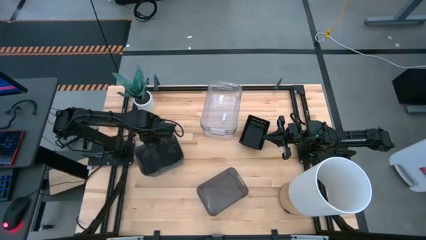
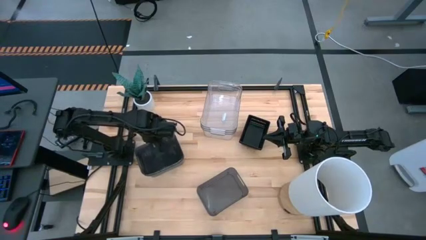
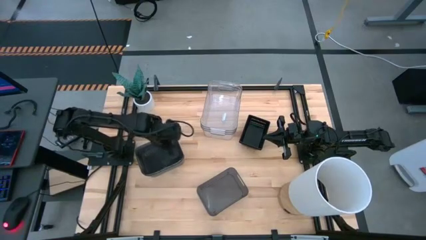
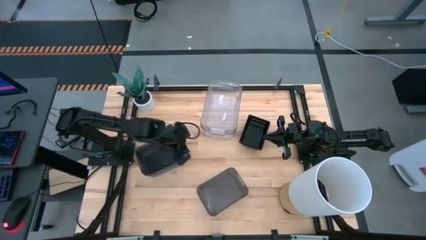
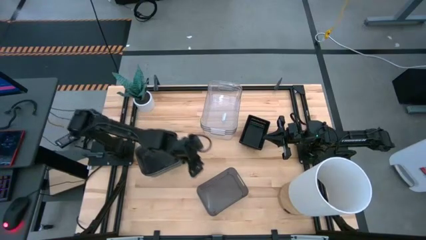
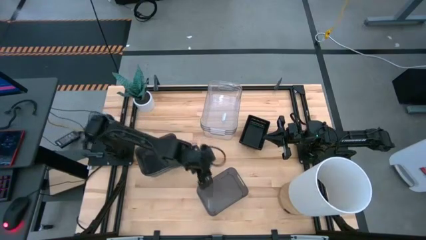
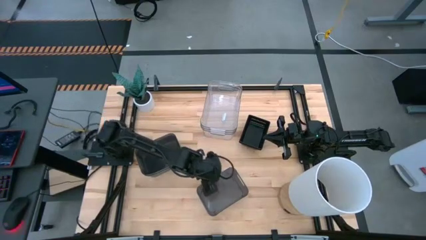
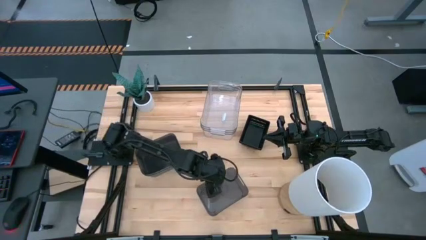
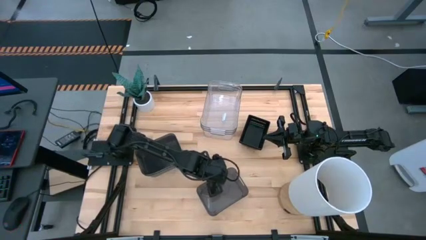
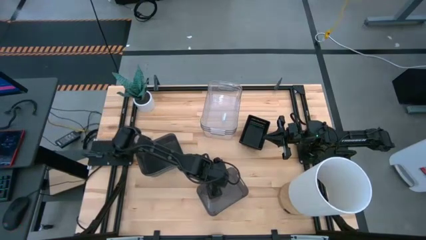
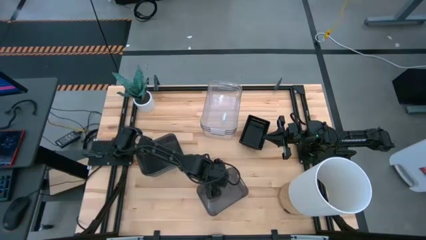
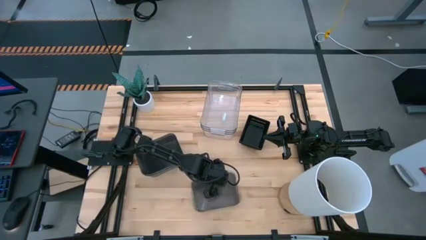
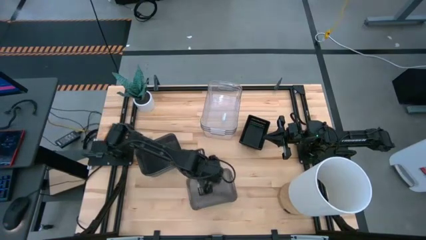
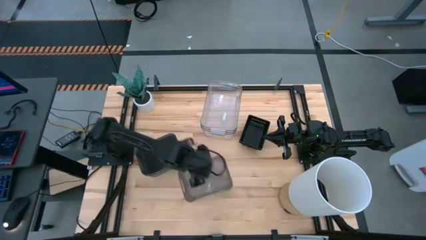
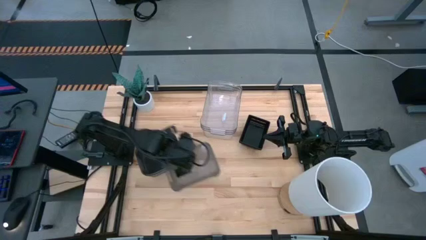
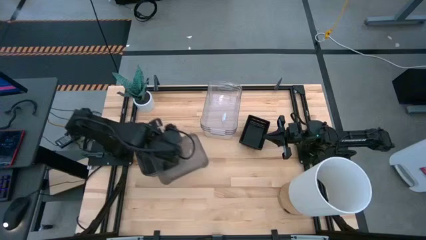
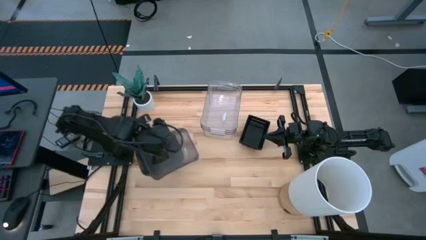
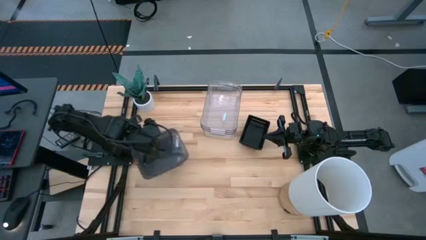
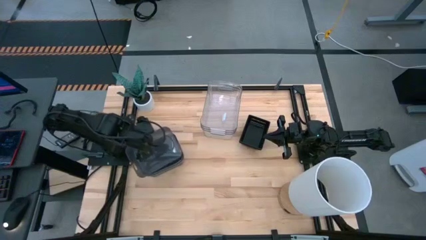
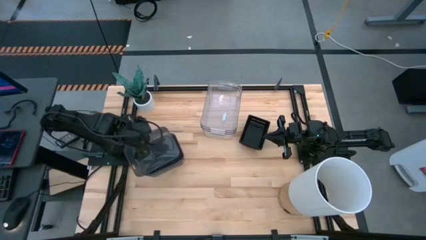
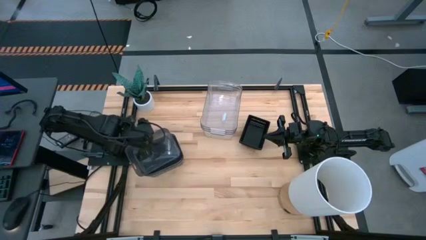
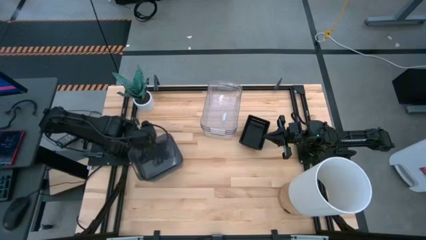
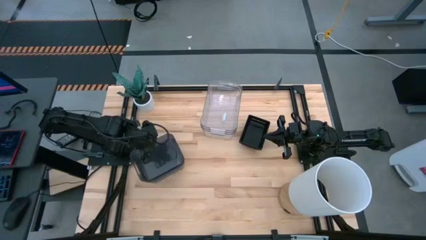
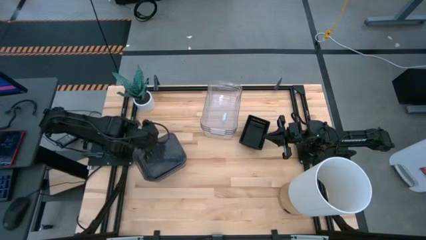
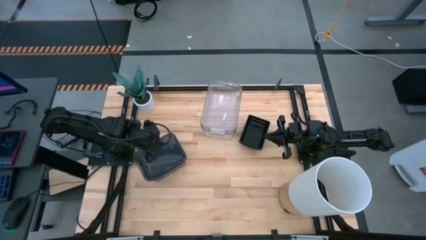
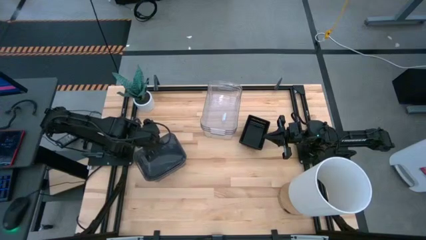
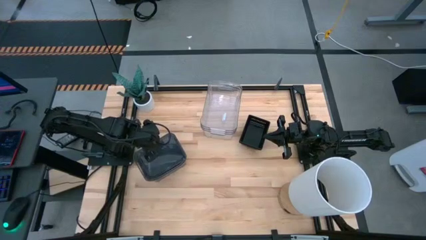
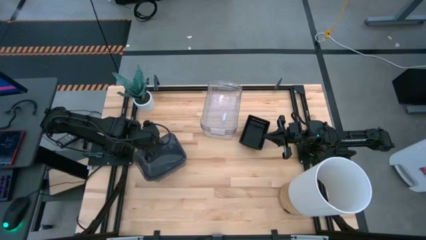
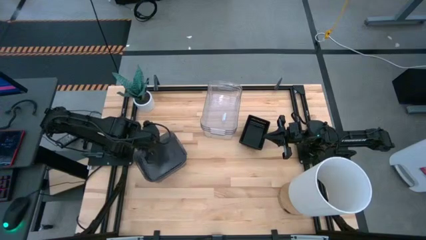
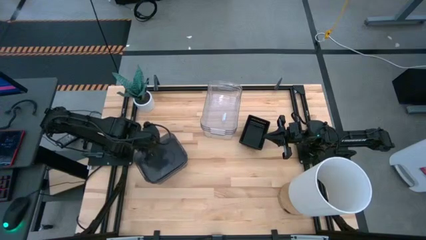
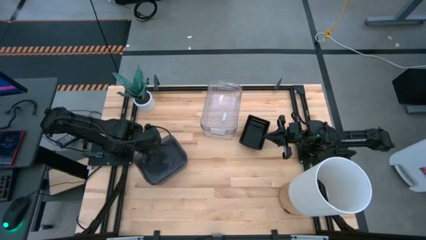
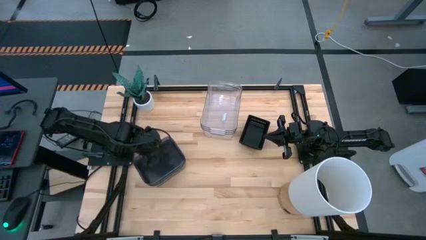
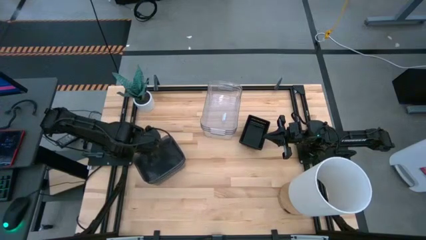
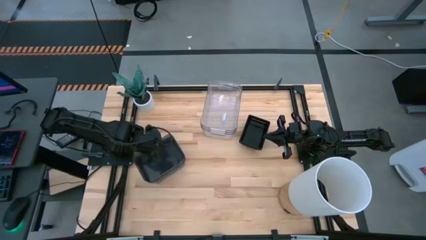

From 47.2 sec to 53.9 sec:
Stack the bottom black transparent bin on the top of the black top transparent bin

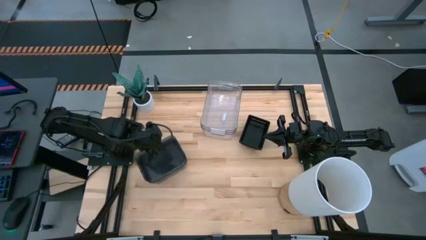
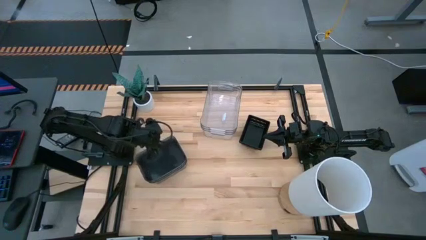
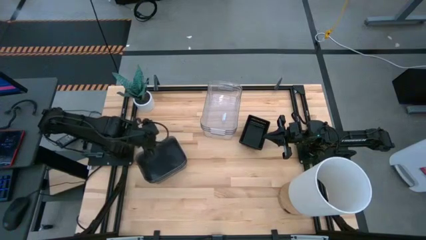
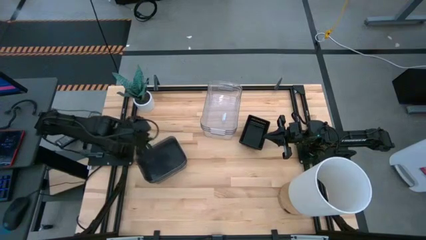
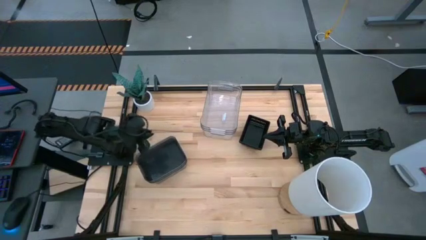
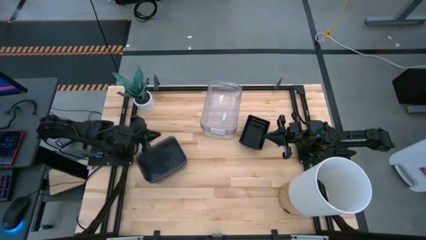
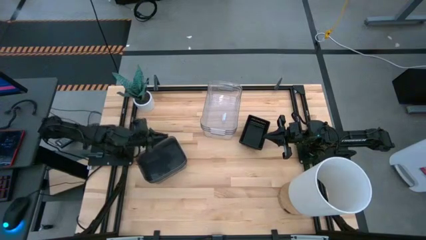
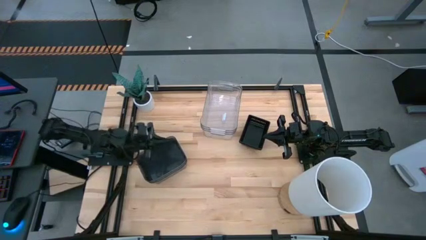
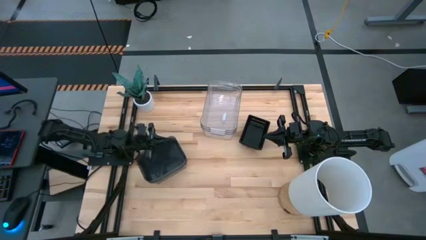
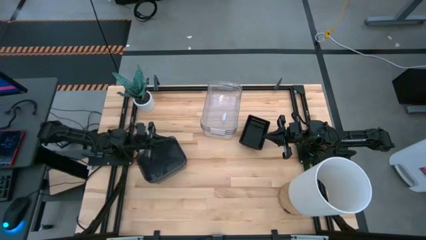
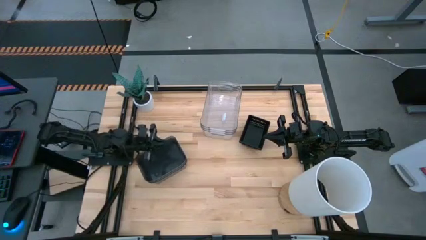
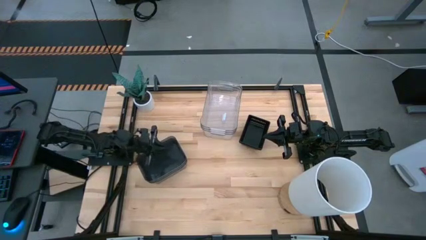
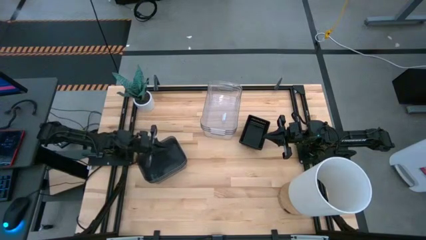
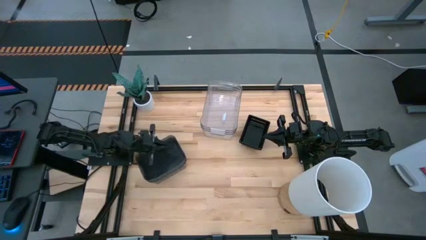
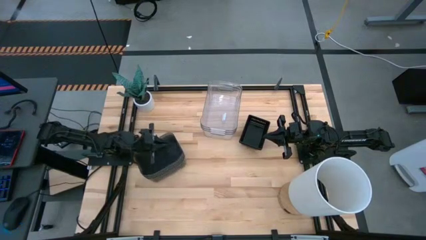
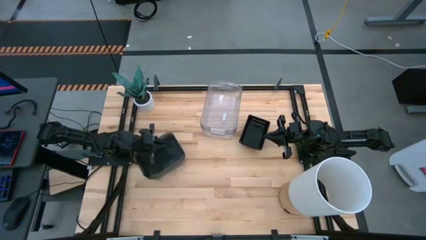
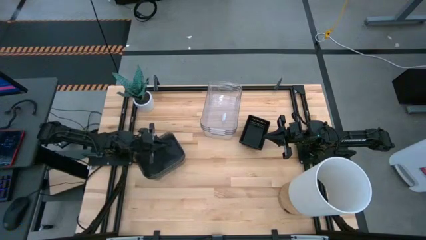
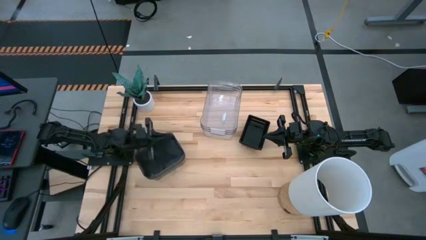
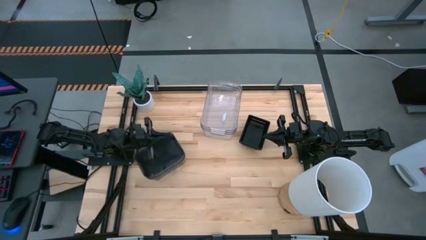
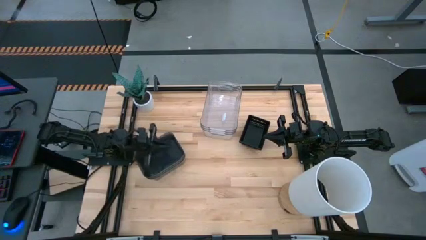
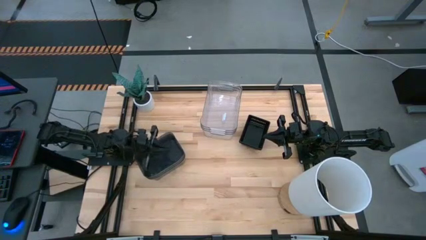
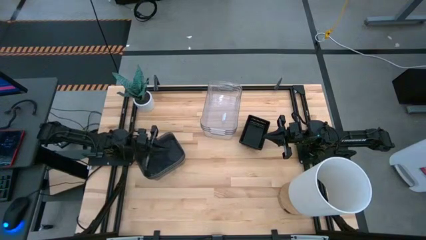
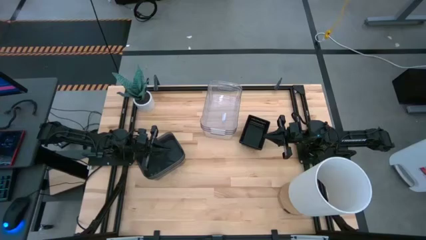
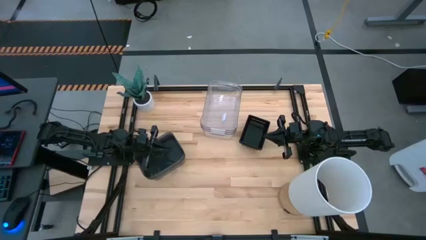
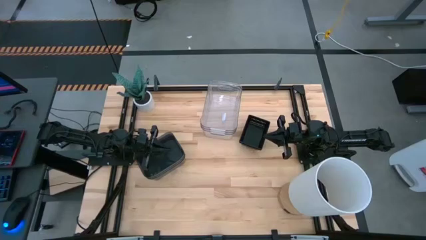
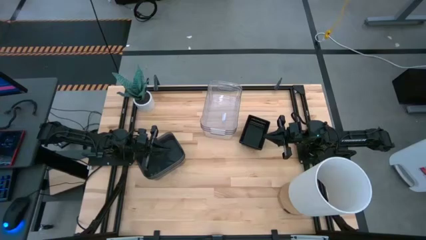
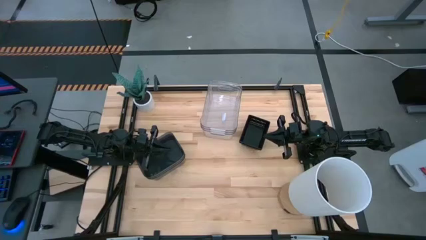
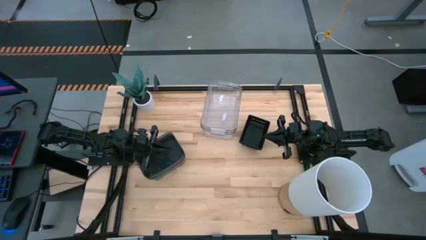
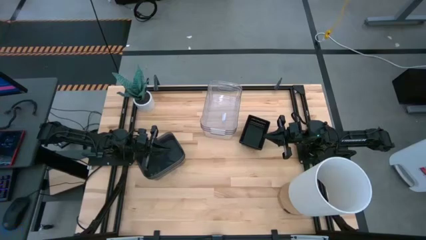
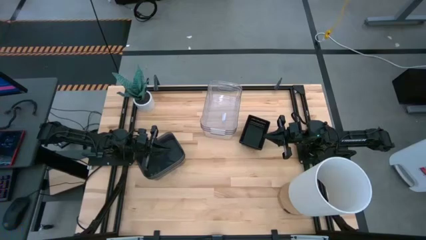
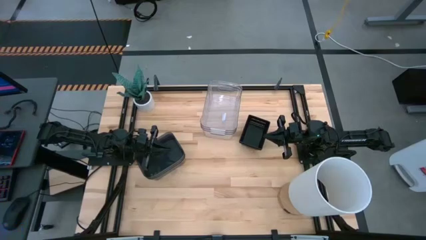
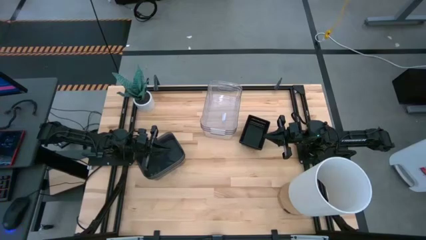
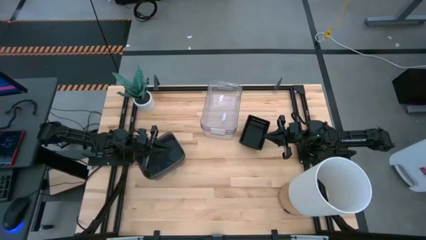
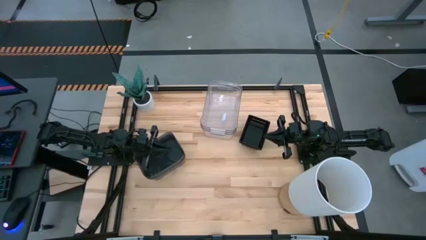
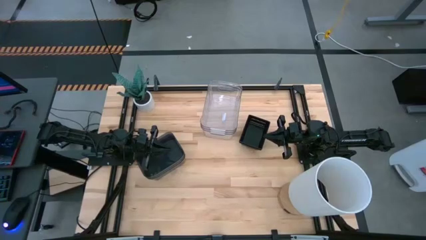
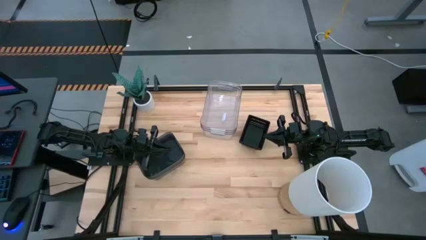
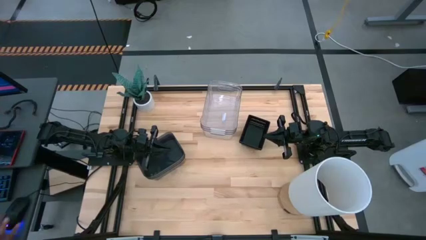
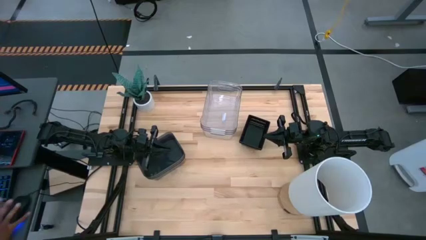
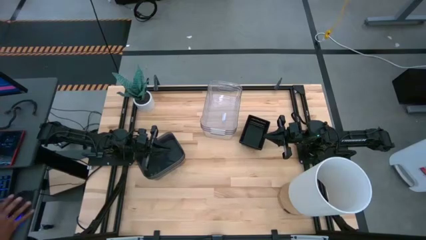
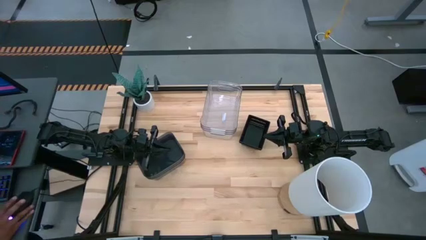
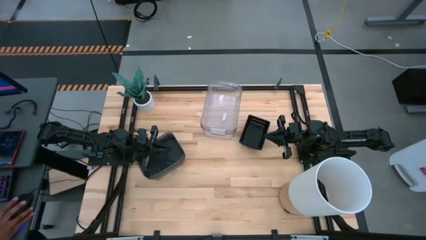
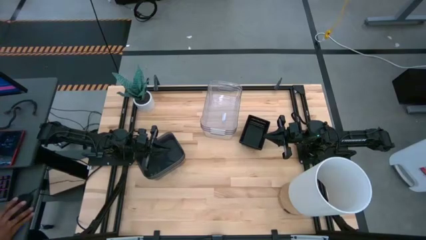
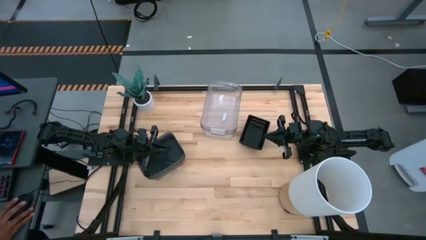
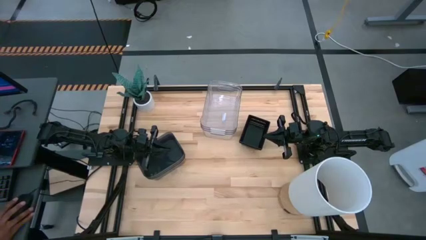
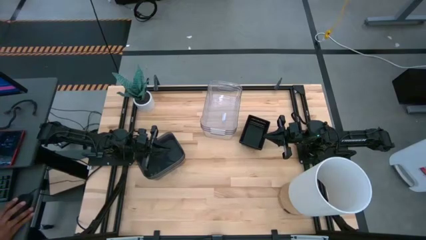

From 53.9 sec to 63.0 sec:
Return to Home Position
